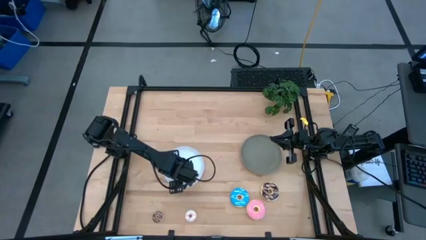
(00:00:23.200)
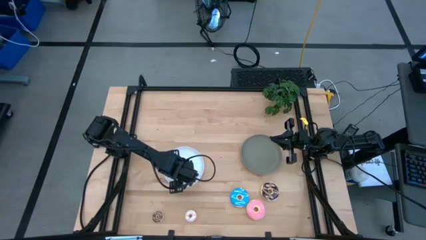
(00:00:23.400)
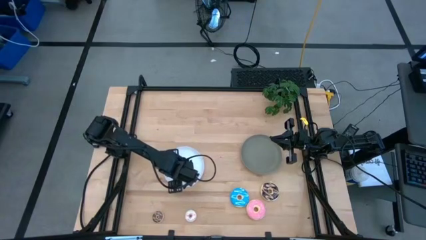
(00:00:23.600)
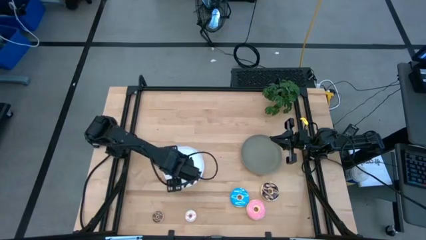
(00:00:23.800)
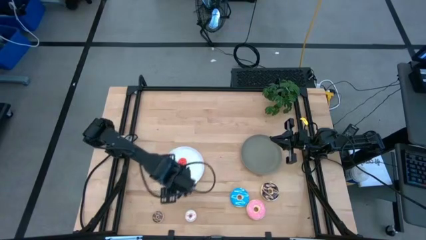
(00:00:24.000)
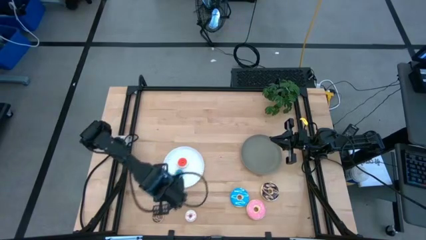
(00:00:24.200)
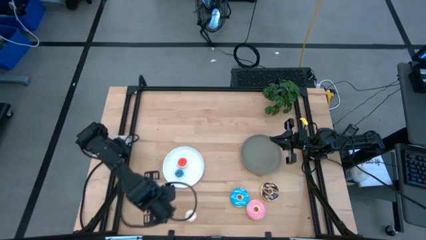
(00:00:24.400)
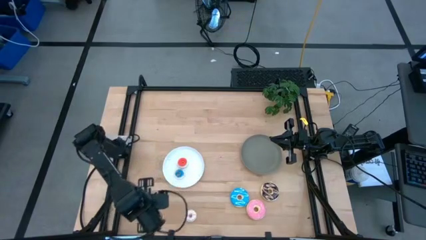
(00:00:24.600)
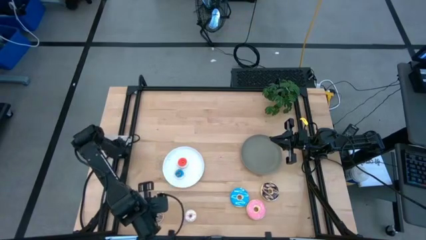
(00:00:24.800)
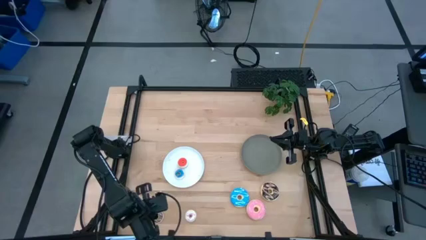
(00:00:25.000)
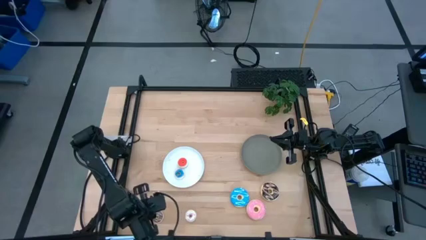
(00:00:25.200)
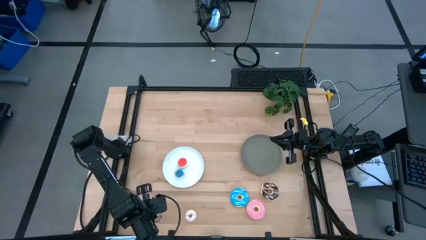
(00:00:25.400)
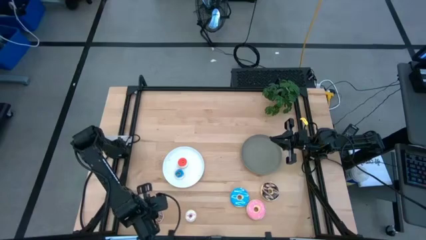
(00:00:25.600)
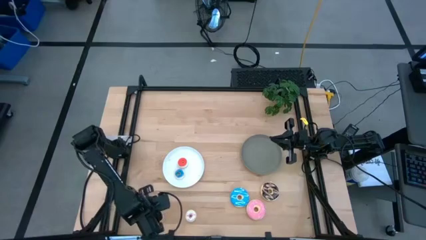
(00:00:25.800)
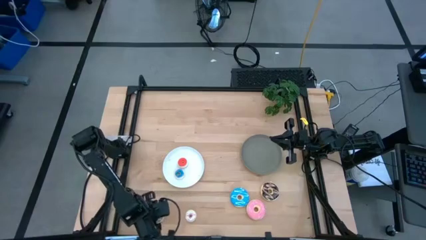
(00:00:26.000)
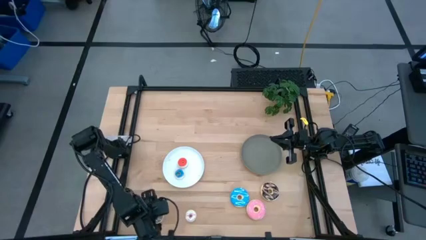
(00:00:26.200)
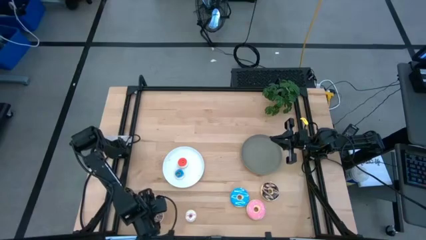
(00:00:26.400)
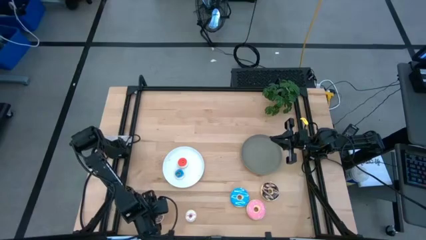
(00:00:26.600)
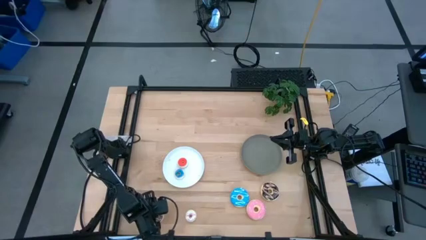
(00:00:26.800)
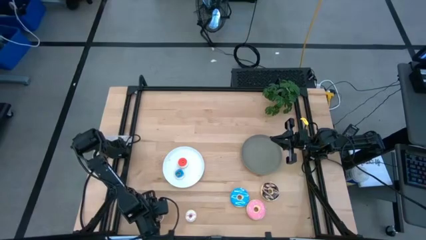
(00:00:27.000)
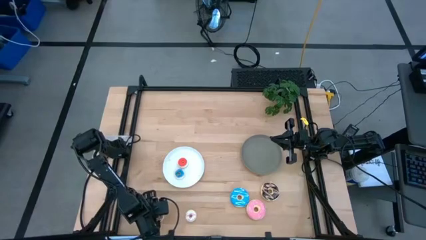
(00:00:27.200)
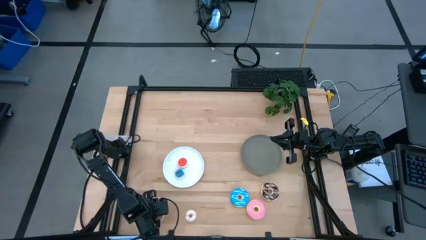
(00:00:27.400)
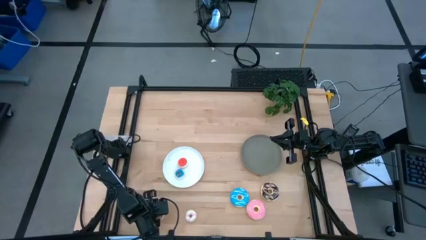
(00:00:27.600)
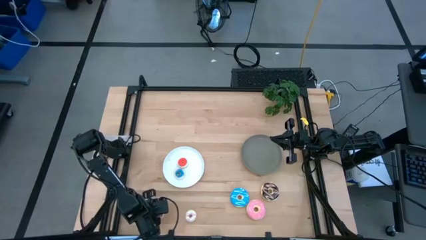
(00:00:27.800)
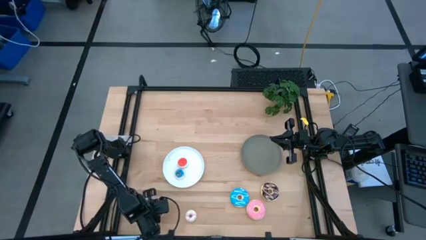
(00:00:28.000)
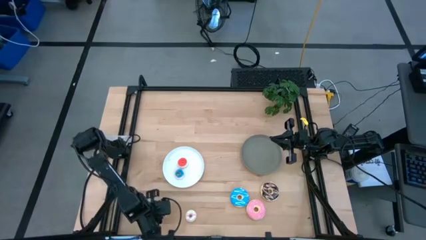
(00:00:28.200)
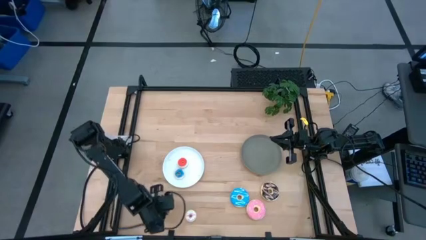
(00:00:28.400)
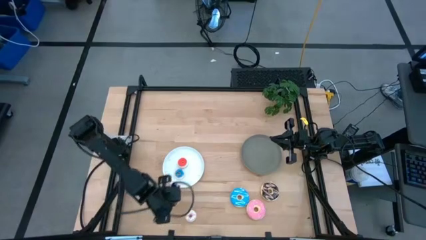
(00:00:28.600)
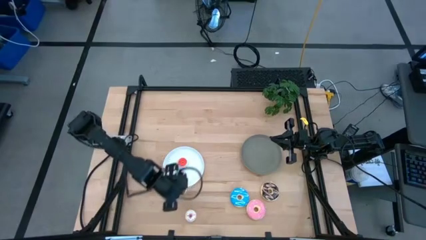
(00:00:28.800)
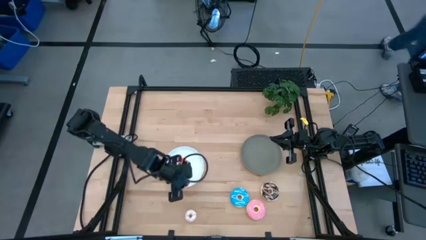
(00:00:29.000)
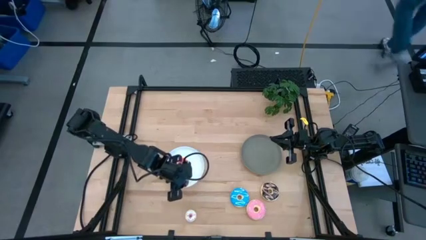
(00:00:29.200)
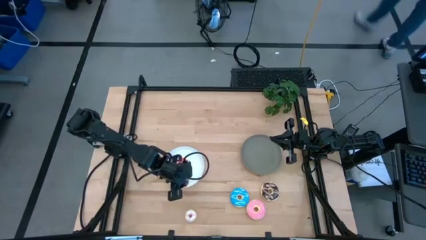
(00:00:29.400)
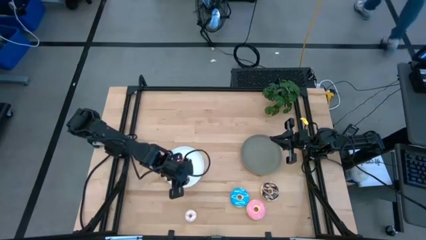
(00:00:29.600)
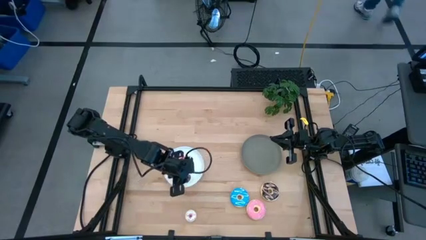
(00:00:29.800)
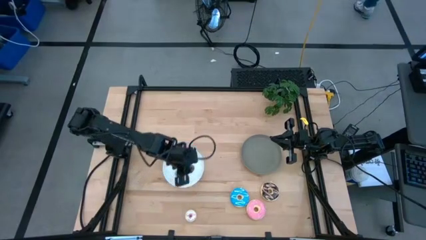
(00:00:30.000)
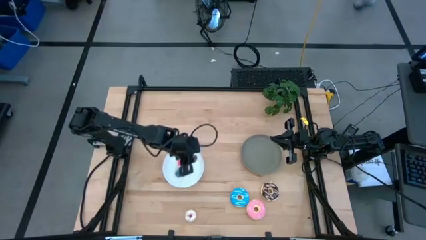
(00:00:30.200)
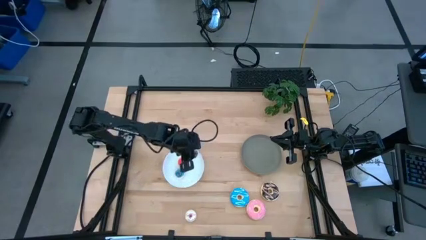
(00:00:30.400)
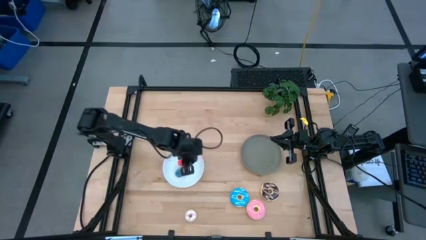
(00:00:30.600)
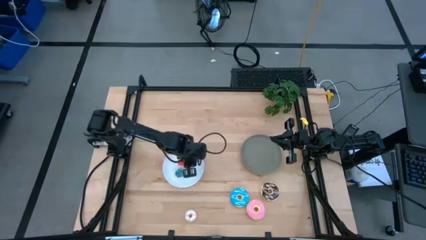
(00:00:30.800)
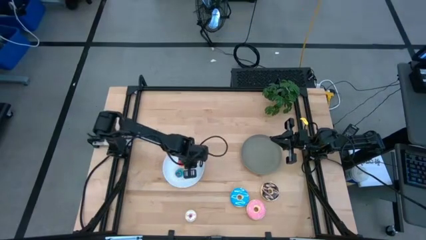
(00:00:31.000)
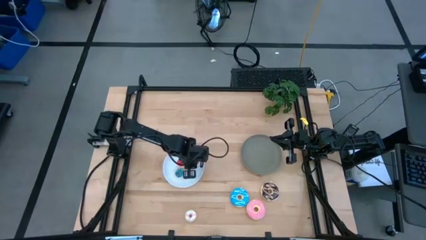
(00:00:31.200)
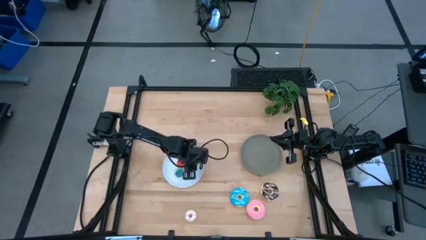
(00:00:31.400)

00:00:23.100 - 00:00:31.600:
Task: Pick & Place donuts
Put the small brown donut on the white plate

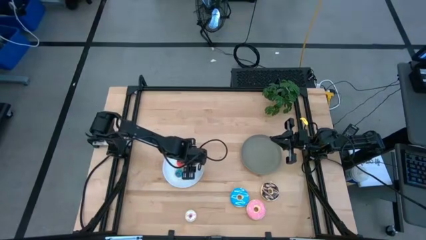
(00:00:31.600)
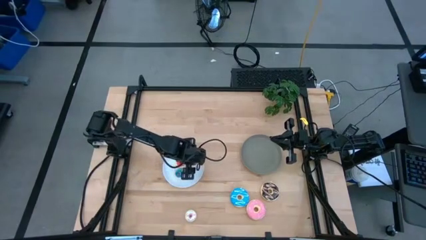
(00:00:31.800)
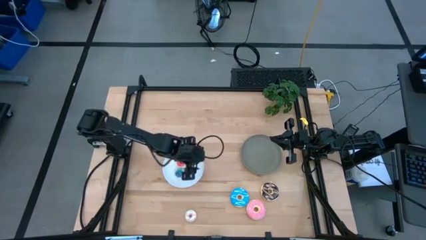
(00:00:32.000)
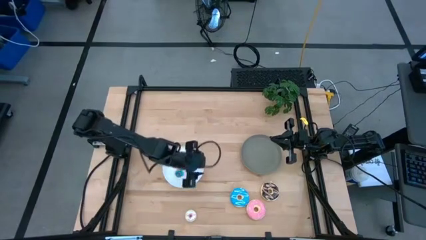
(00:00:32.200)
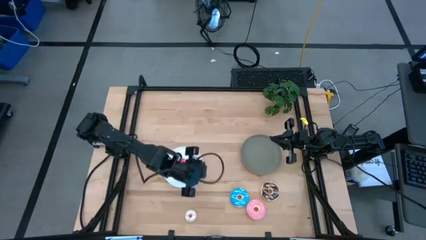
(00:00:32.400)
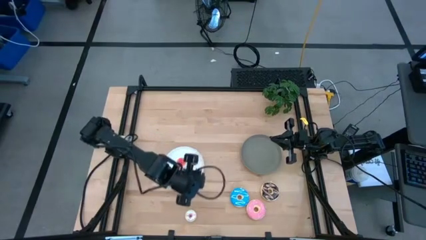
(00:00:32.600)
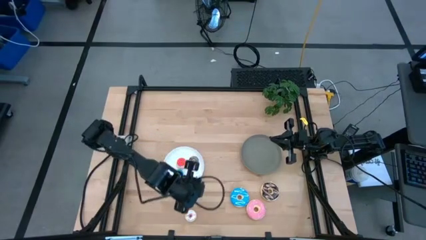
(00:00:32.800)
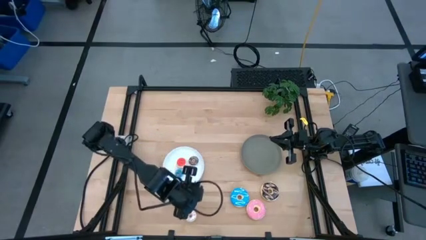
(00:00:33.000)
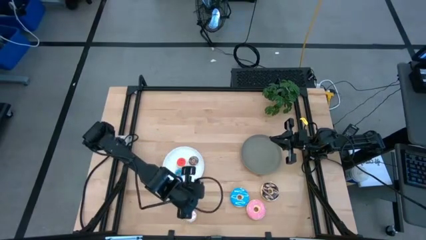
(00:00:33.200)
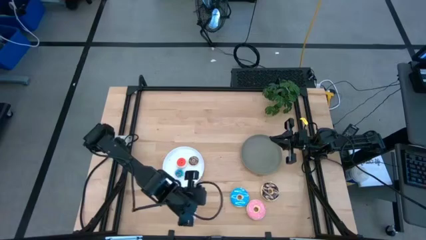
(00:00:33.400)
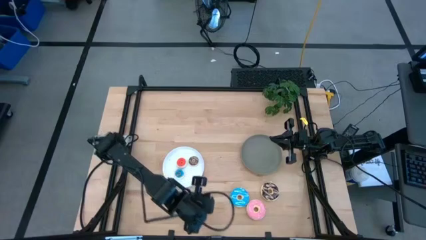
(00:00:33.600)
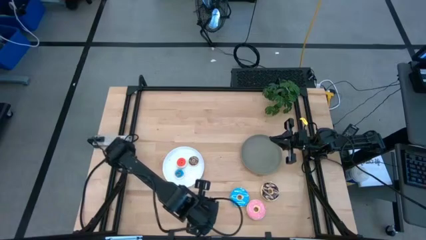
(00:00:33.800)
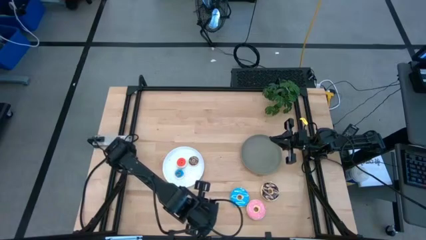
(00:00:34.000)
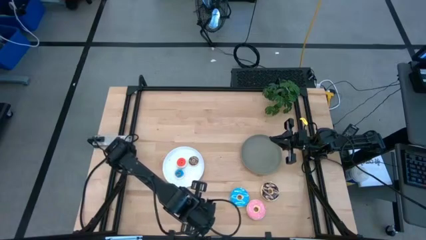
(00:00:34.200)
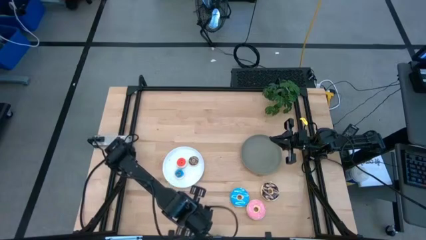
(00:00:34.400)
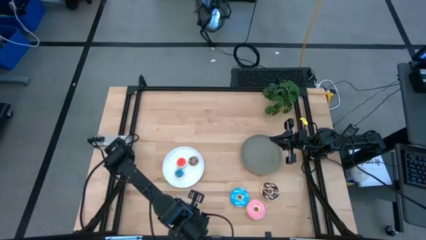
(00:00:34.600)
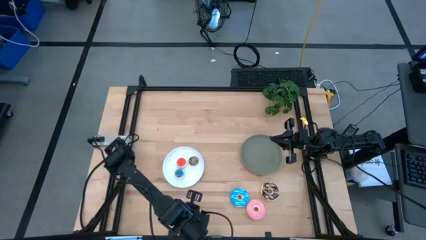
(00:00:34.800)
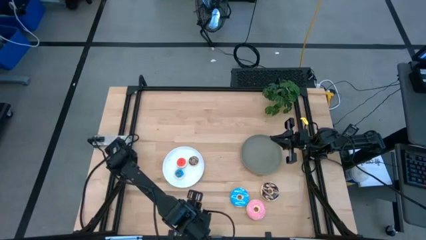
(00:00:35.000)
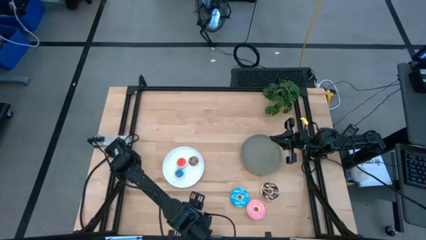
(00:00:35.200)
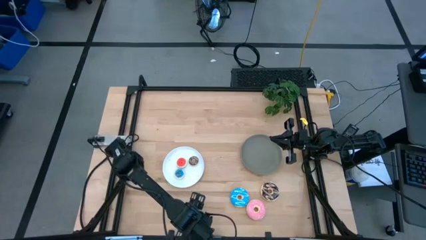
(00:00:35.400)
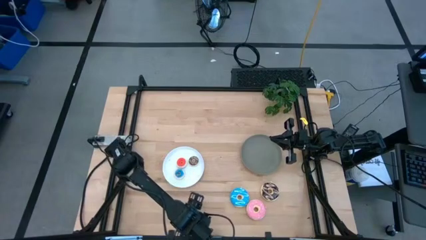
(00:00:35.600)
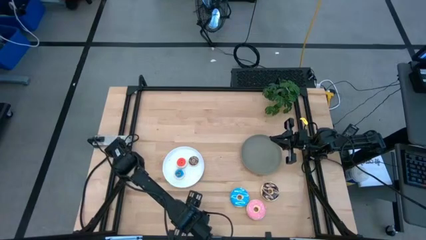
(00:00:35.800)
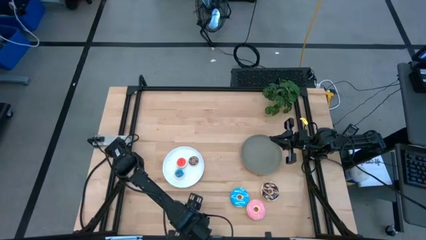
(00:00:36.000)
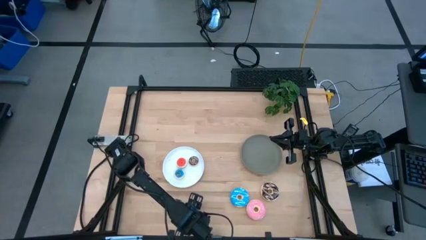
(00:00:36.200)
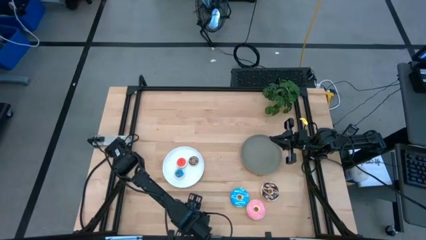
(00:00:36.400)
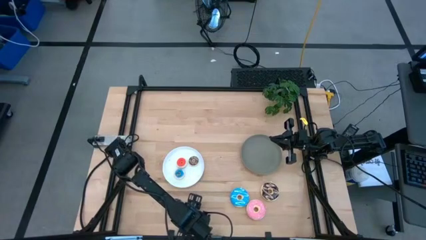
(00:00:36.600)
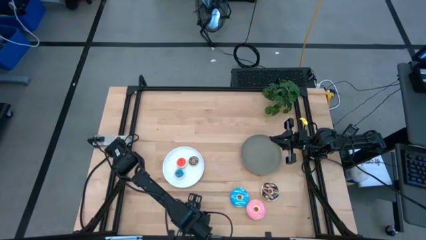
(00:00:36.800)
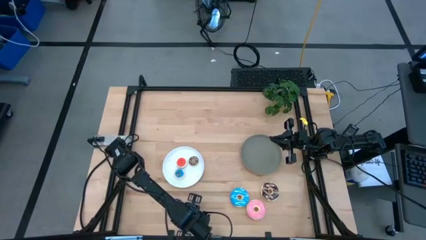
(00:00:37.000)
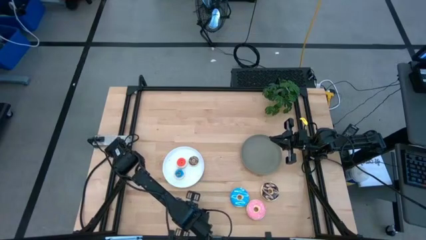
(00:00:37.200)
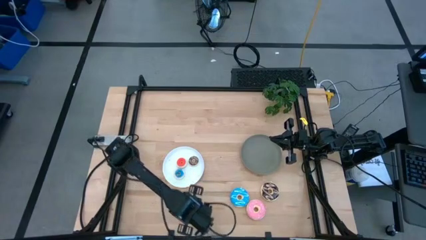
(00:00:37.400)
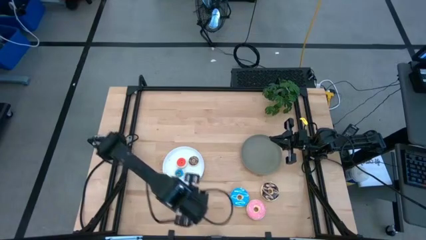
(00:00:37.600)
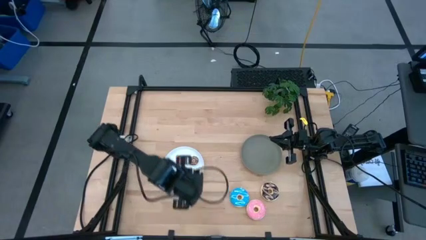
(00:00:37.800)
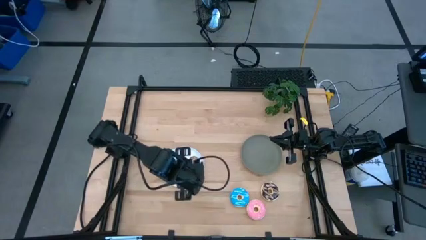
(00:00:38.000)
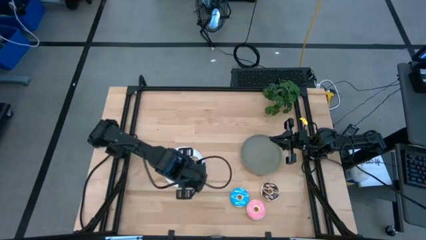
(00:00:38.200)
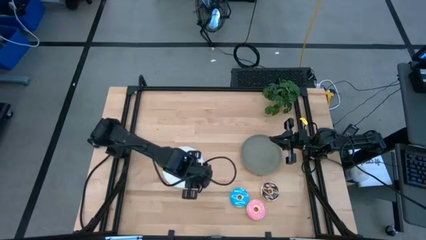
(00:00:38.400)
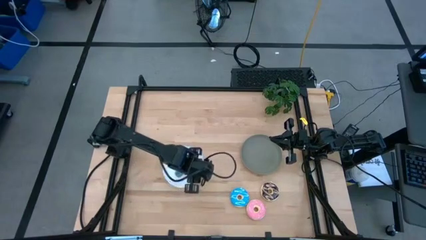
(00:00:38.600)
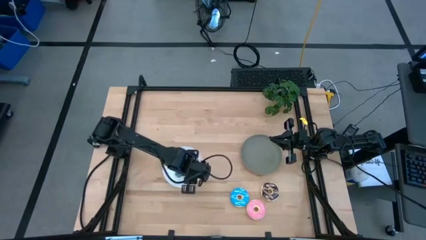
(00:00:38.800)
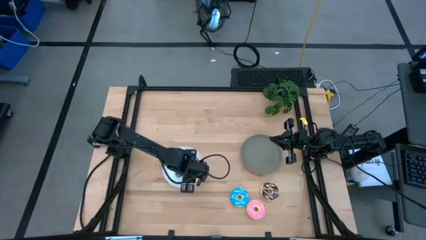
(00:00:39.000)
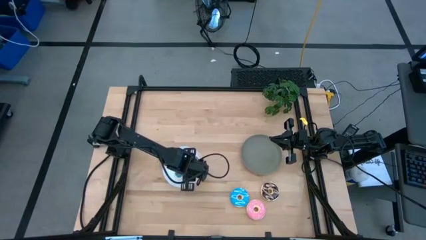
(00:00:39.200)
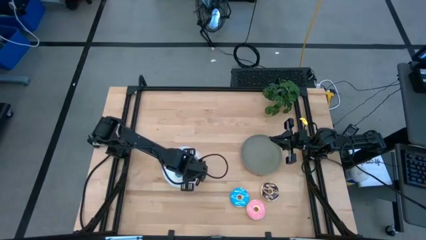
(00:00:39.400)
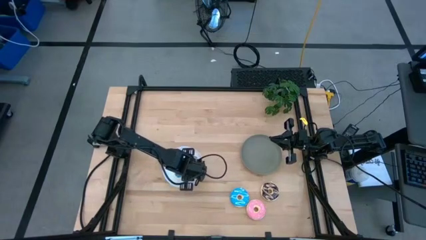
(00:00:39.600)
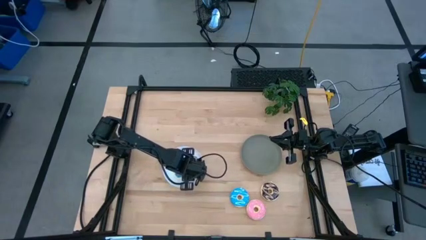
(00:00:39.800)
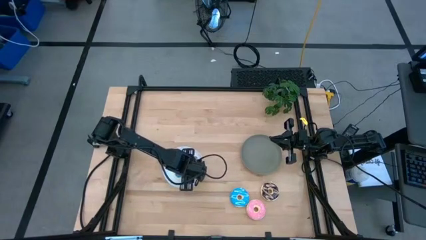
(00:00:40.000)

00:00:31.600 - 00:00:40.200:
Put the small white donut on the white plate
